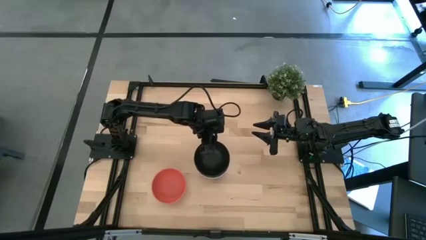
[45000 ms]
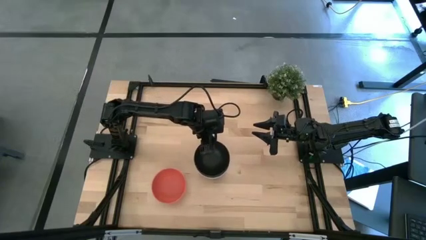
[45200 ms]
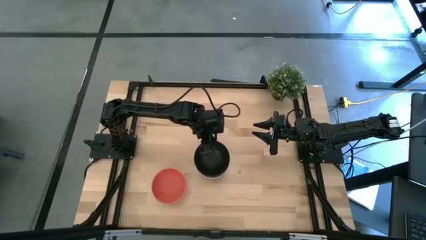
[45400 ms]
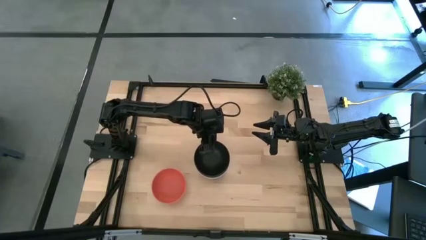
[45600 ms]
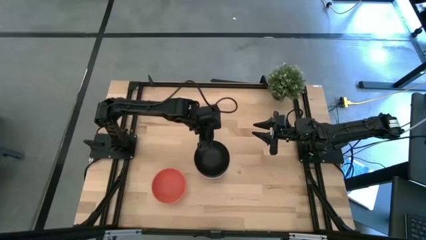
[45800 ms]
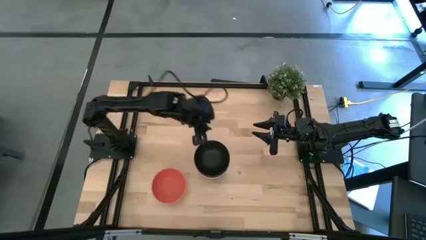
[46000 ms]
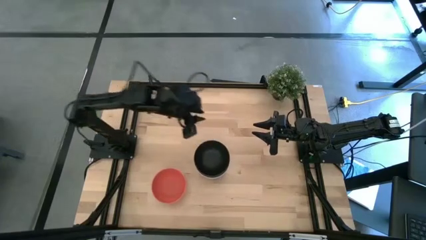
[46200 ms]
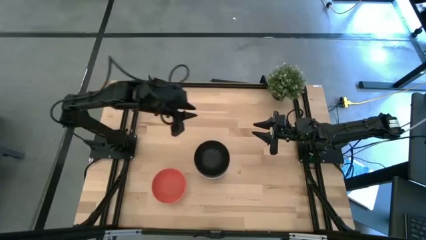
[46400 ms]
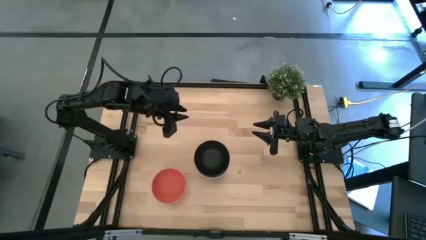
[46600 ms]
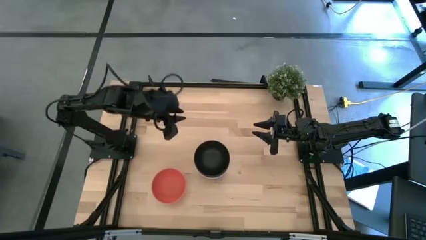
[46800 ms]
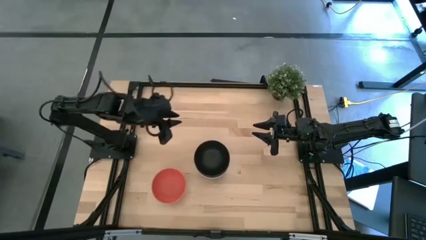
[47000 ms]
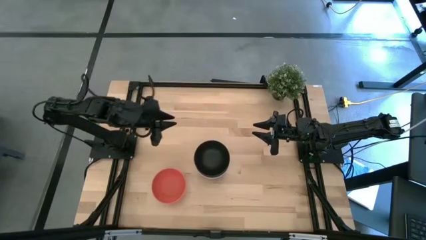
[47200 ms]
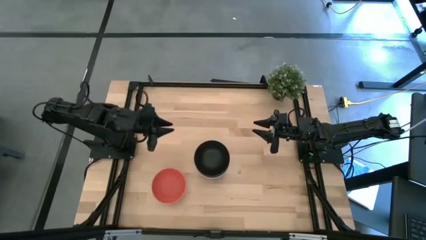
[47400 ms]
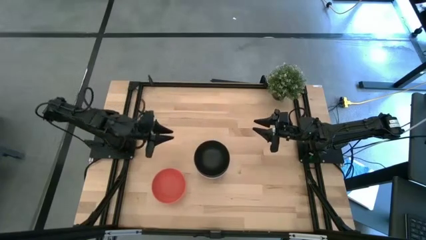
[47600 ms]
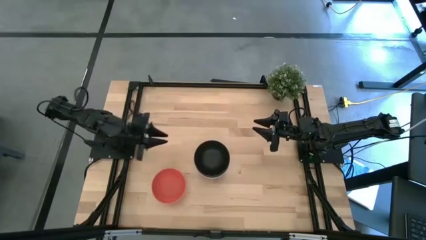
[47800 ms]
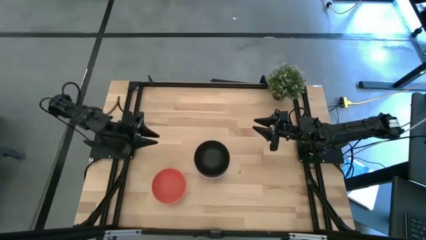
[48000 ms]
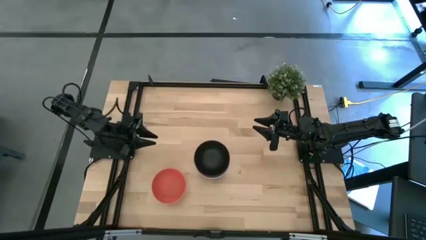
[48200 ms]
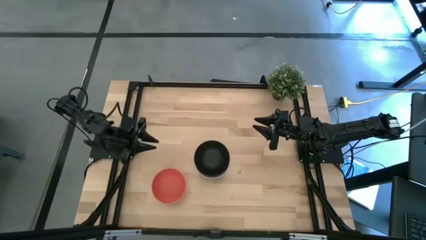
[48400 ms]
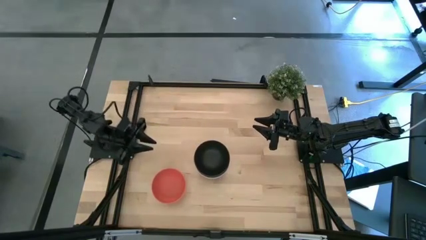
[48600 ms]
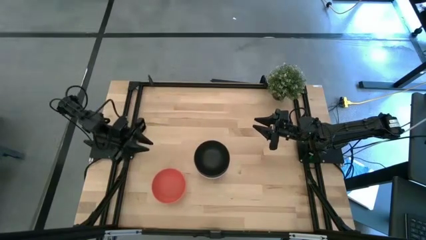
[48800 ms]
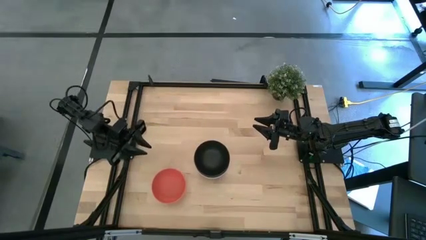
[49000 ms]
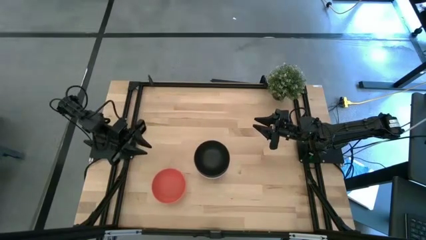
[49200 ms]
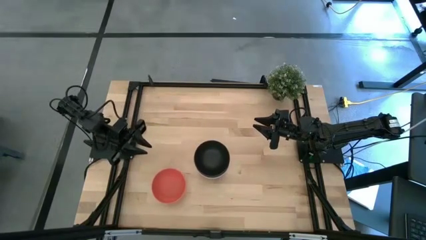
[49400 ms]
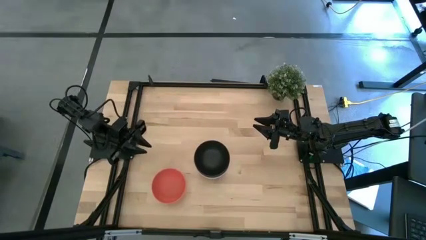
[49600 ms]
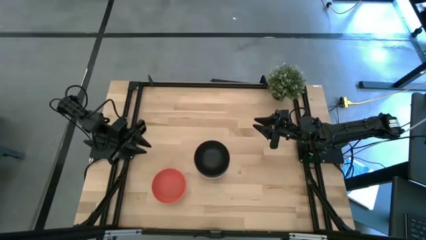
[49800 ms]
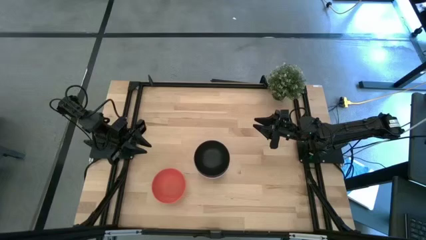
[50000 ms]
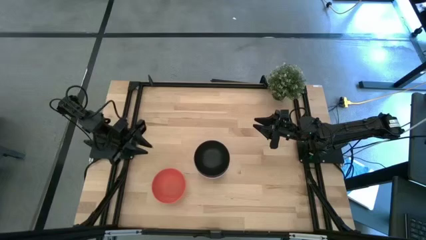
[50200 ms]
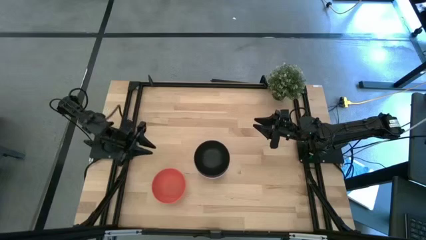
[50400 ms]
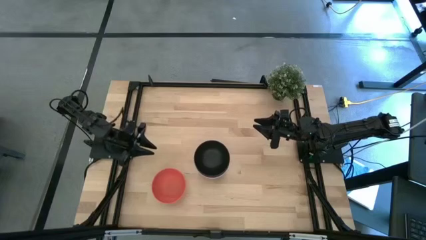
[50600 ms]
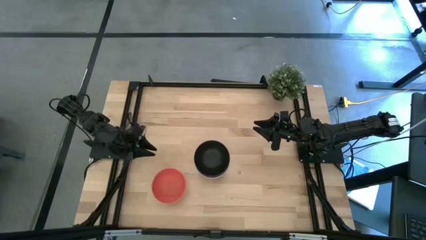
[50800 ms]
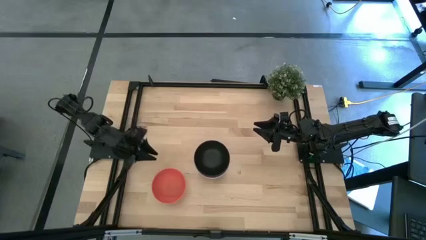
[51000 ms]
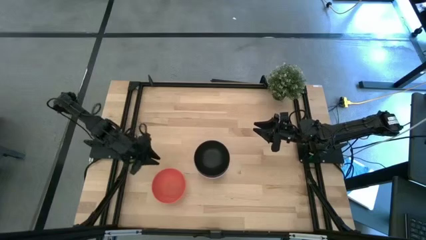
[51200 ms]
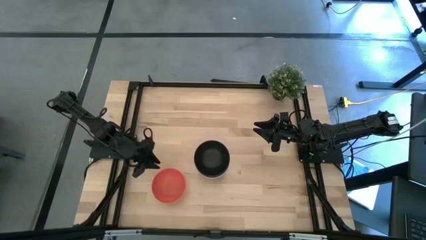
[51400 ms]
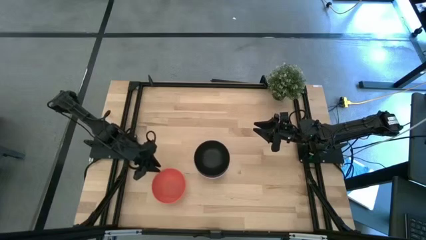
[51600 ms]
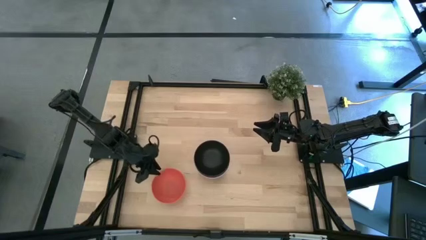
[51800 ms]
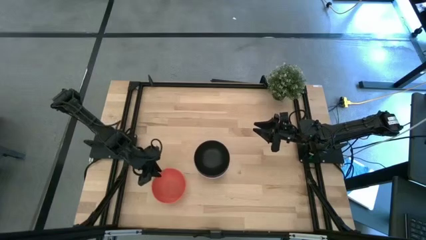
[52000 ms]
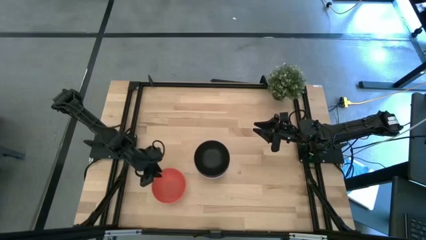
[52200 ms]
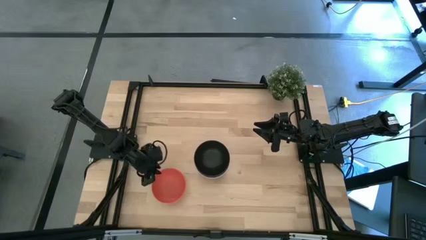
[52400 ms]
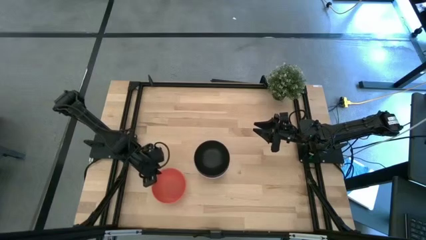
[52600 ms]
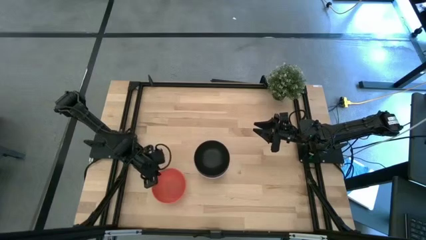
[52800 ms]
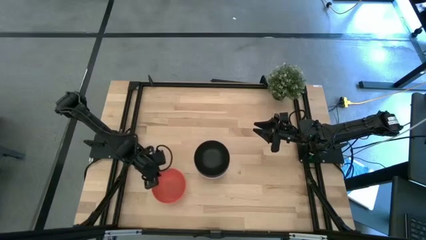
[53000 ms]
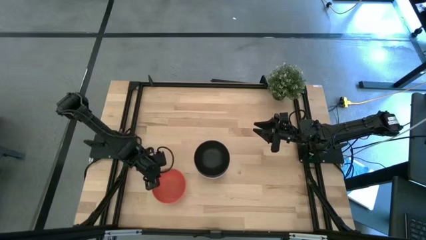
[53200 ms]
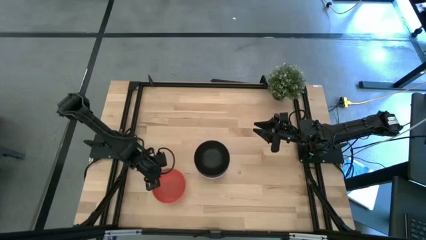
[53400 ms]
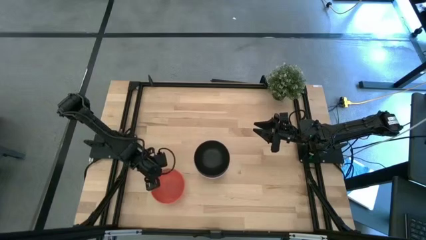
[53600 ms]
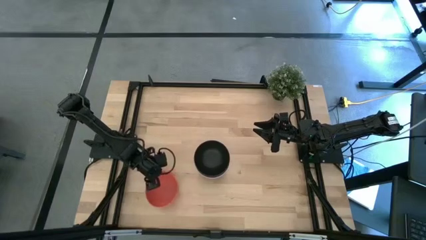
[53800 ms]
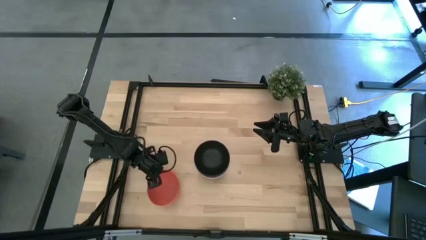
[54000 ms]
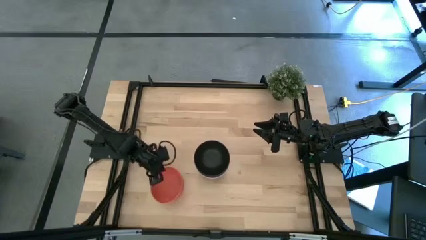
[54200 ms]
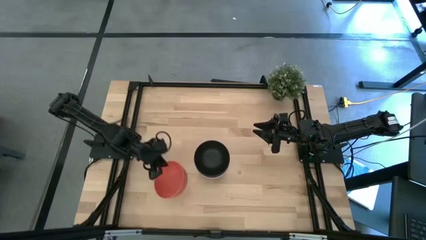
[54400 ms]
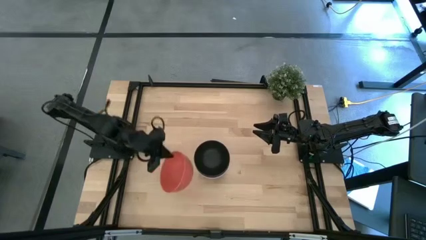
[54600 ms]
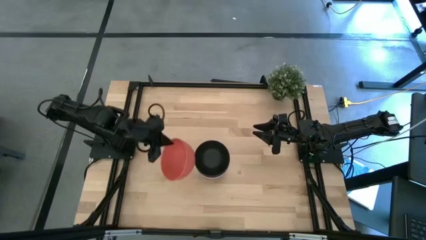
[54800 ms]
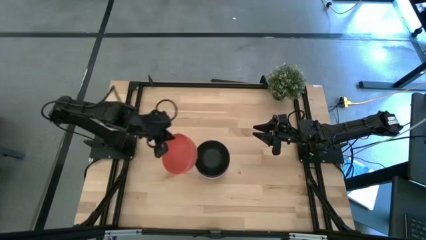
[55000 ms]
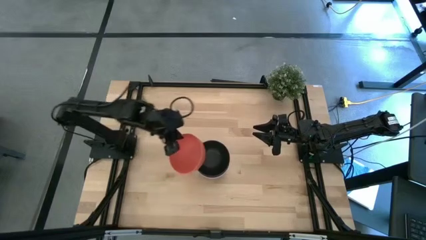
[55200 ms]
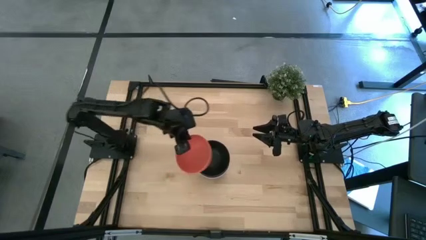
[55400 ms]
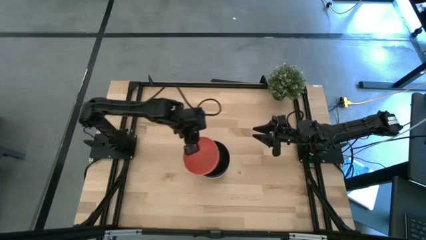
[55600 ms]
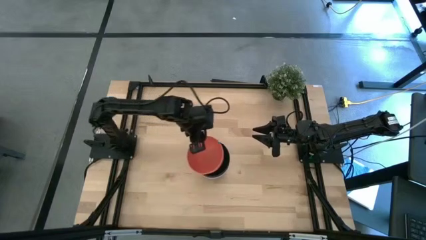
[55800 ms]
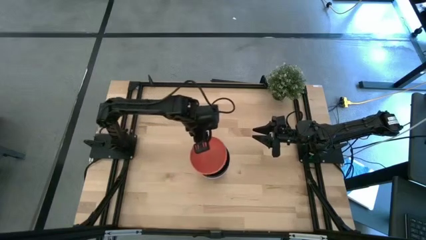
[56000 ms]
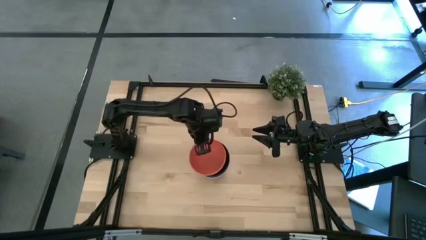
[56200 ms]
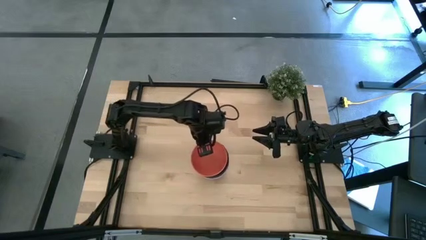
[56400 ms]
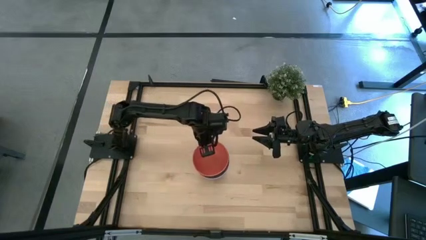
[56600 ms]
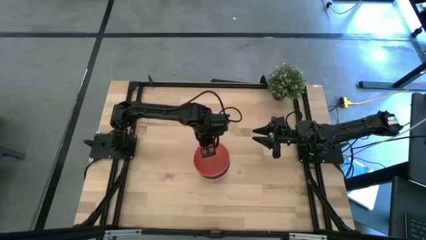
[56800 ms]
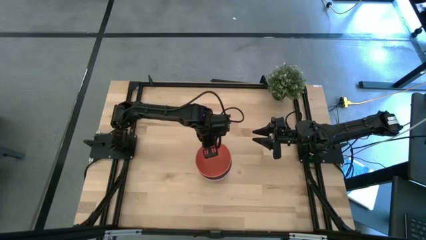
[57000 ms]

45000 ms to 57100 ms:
Task: Nest bowls inside each other
Stack the orange bowl on top of the black bowl
